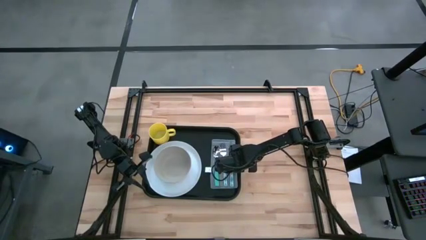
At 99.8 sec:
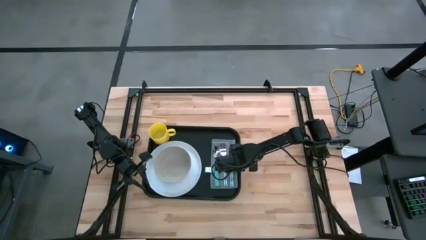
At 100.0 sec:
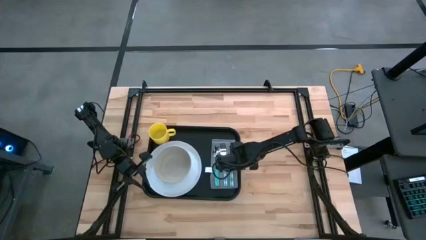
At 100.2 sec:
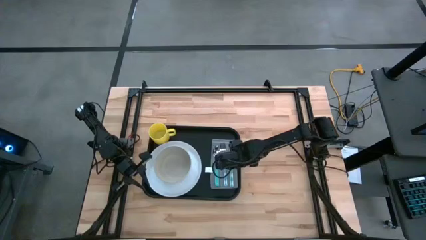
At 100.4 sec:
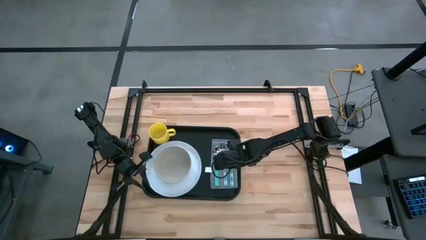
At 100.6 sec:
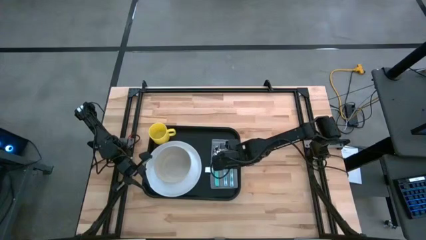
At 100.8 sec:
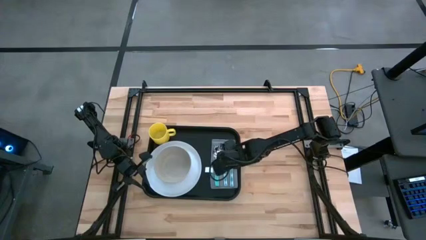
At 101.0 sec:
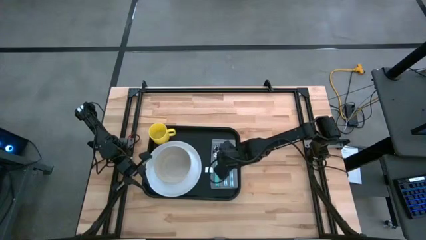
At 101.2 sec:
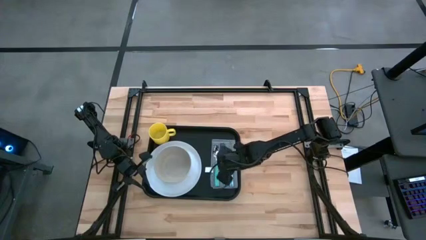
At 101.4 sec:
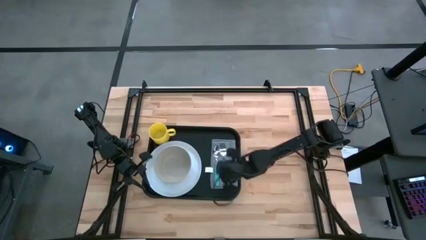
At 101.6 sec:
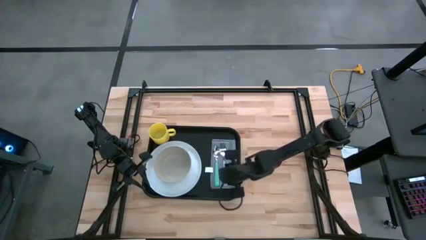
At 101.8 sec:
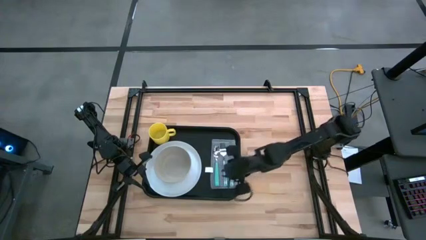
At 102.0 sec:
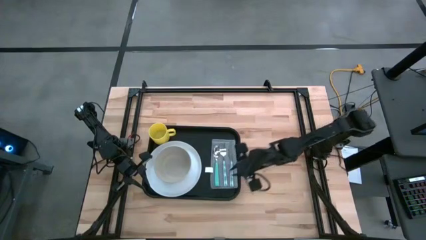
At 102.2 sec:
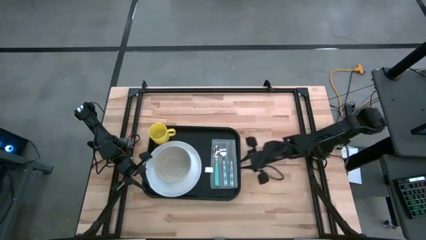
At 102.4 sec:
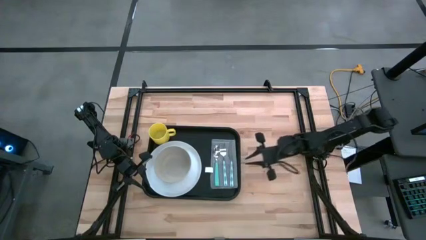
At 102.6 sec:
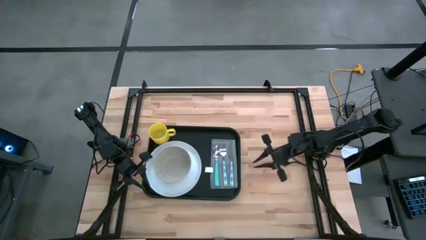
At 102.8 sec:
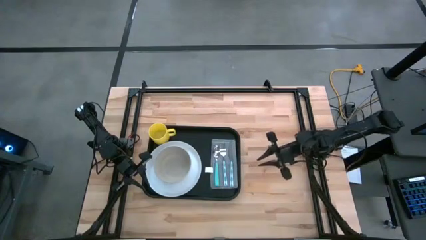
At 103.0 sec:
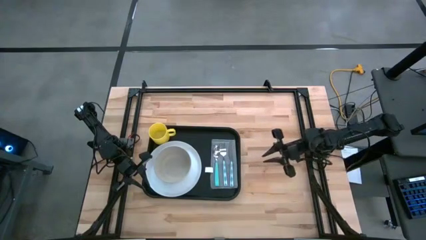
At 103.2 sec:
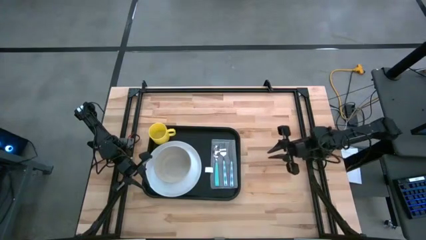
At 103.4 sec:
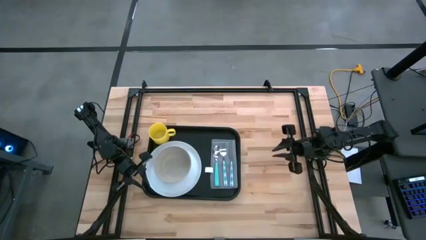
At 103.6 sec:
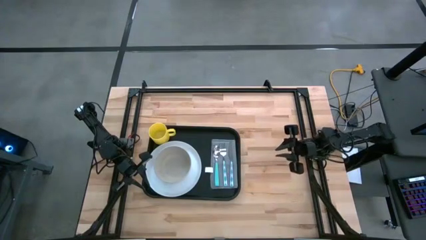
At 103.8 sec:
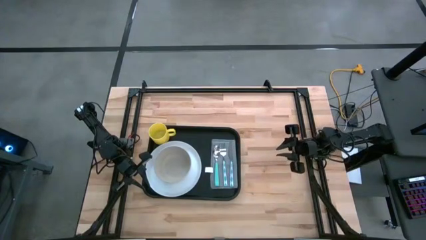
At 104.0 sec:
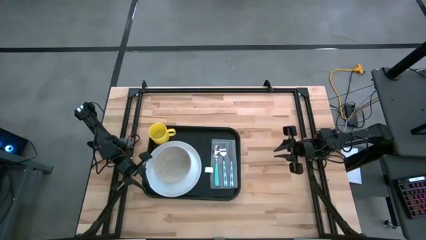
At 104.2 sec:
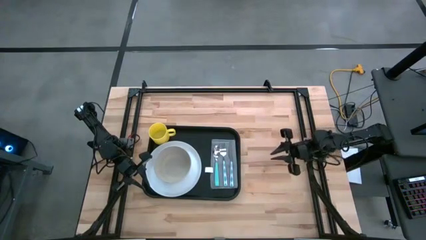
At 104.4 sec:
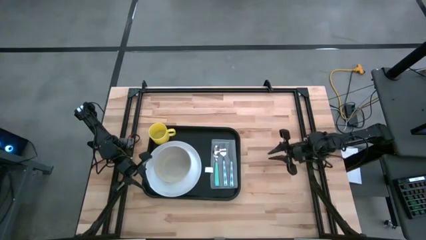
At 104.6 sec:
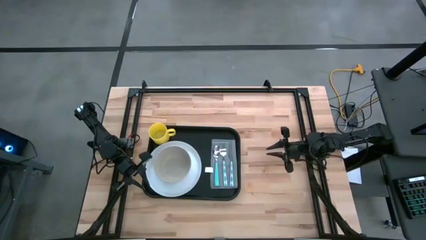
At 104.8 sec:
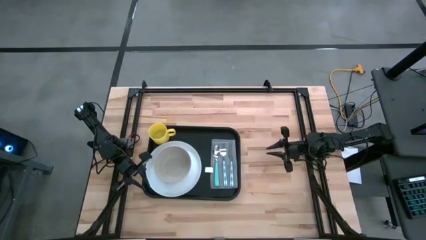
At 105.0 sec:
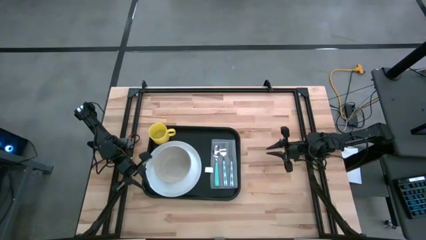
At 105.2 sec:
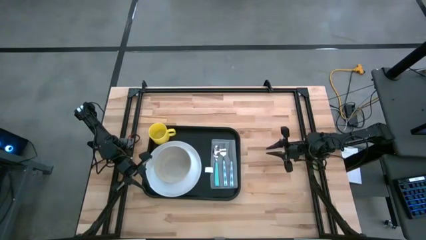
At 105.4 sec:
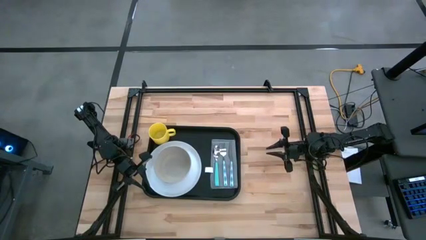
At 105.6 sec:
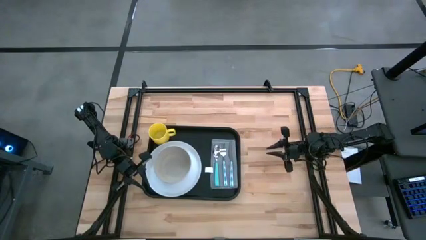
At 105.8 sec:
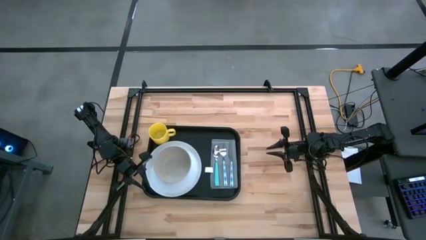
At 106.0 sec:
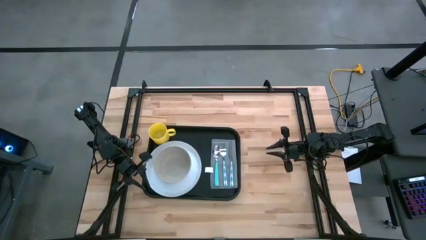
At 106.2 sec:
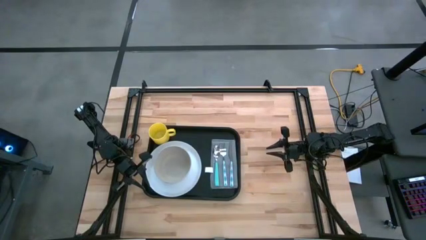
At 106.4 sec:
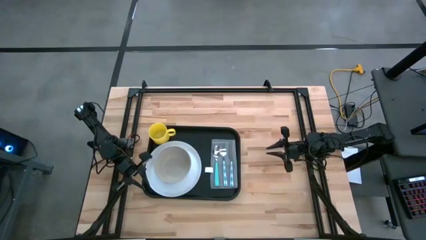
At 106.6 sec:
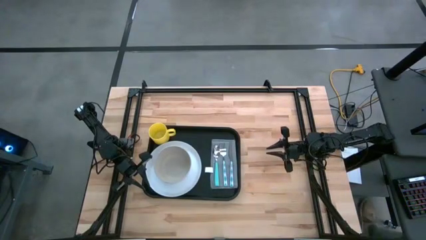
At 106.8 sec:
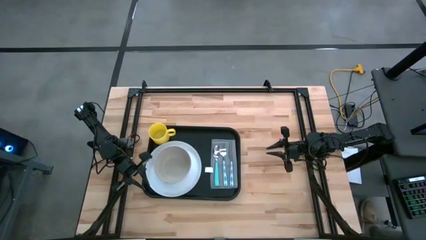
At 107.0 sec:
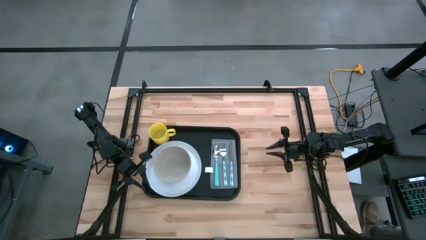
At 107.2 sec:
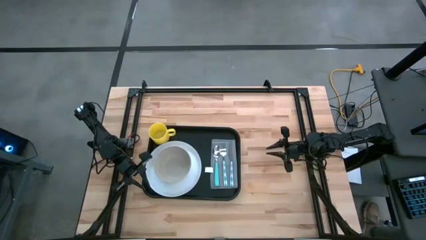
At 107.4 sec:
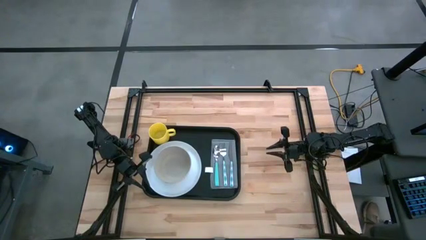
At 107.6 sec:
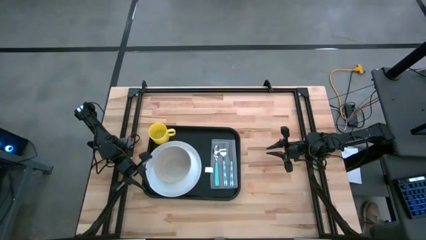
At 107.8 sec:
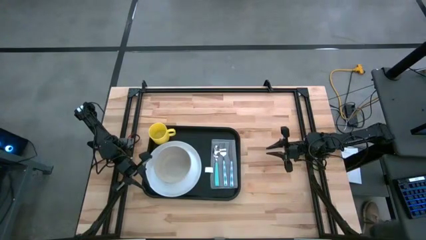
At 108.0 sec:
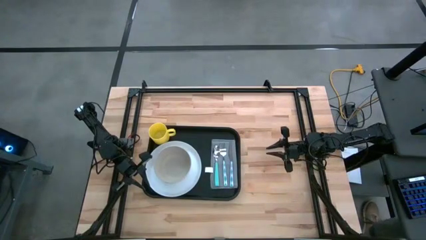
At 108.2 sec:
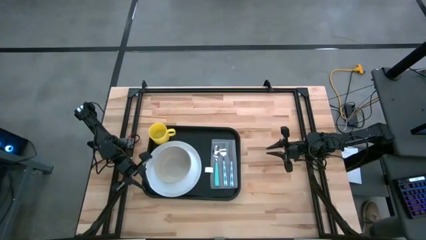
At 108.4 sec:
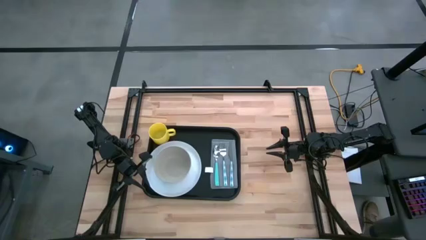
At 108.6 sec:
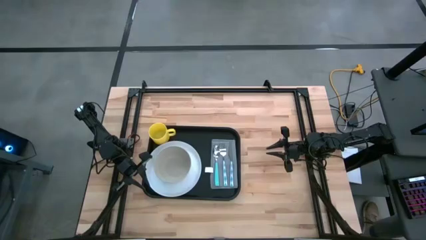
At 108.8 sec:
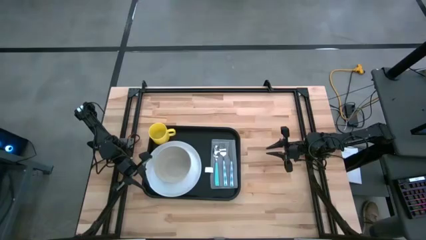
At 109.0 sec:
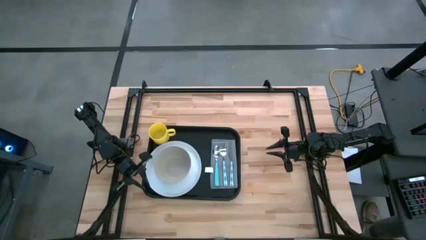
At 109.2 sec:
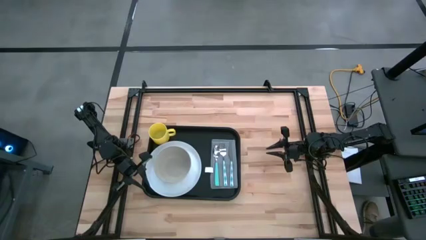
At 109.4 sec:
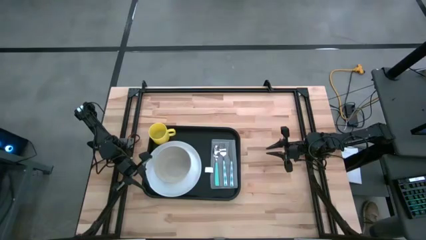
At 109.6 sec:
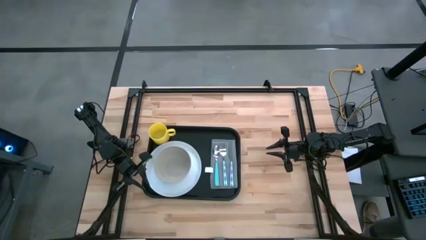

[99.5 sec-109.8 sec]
Task: Set up tray
Return to Home Position

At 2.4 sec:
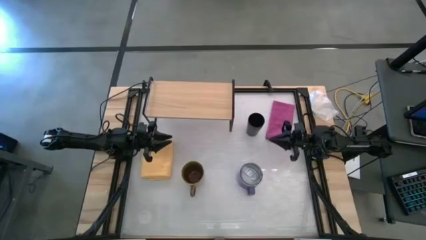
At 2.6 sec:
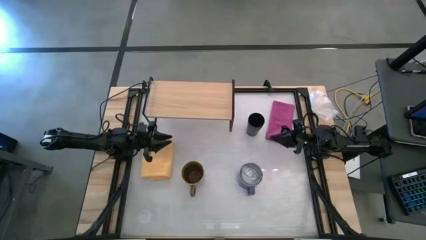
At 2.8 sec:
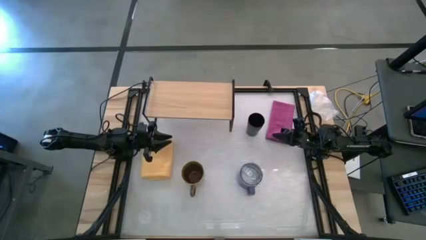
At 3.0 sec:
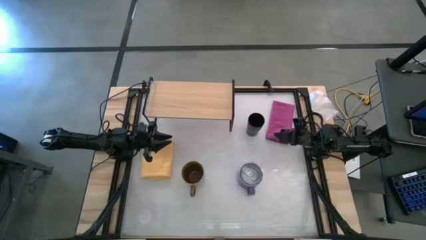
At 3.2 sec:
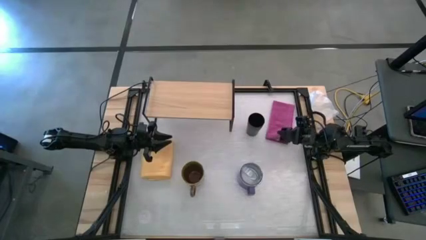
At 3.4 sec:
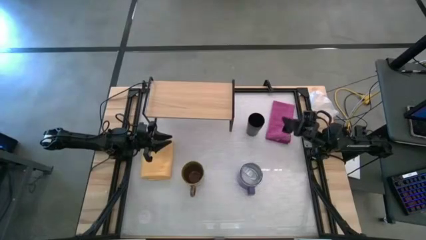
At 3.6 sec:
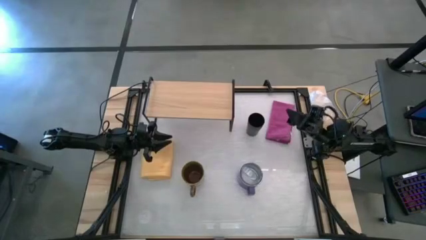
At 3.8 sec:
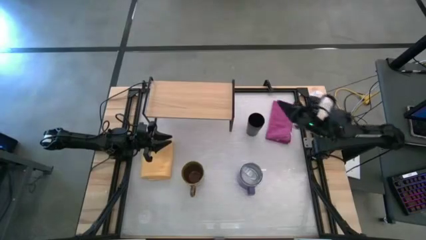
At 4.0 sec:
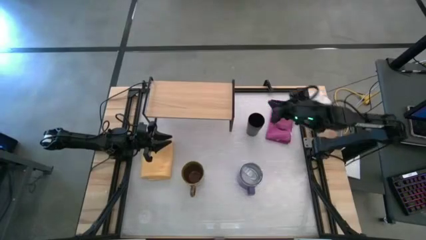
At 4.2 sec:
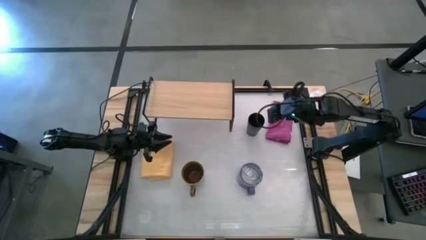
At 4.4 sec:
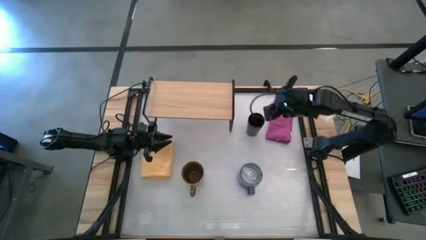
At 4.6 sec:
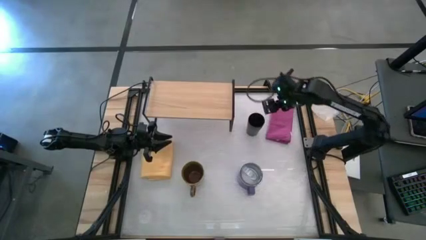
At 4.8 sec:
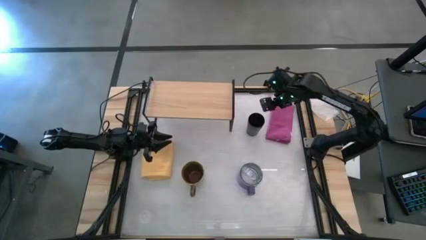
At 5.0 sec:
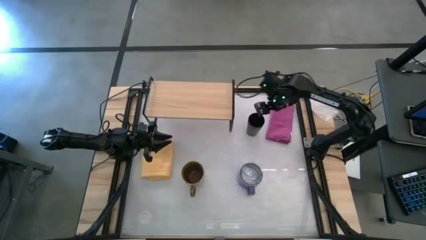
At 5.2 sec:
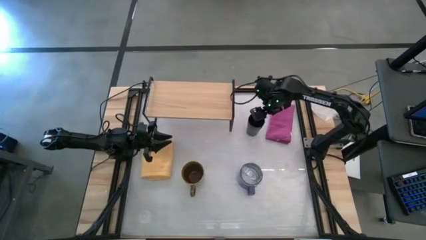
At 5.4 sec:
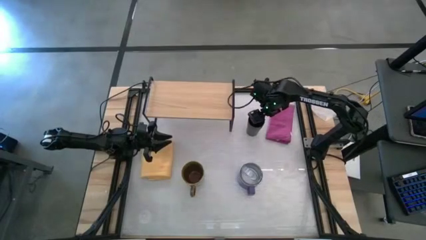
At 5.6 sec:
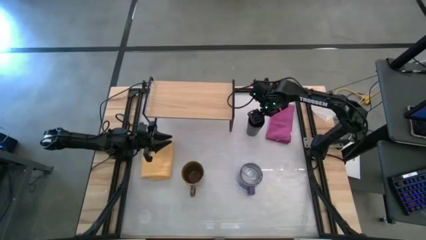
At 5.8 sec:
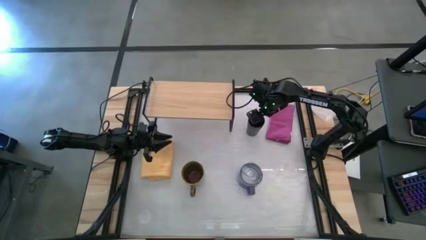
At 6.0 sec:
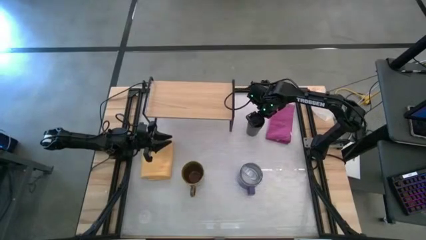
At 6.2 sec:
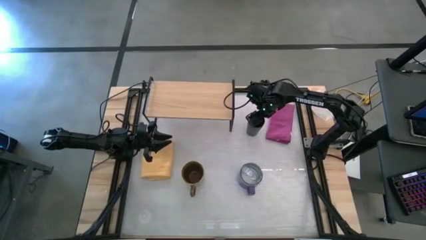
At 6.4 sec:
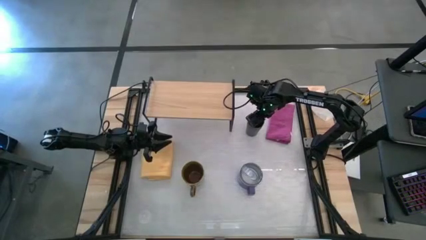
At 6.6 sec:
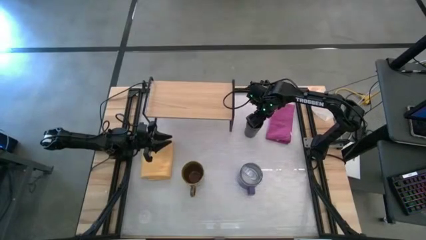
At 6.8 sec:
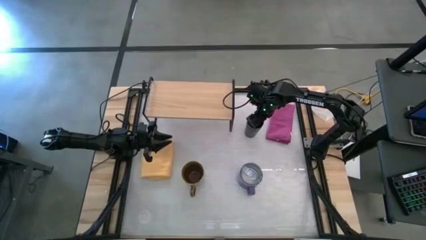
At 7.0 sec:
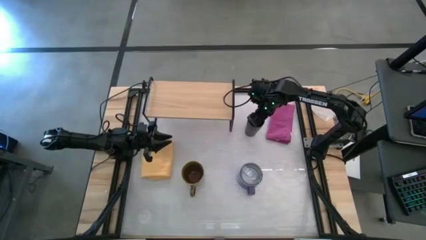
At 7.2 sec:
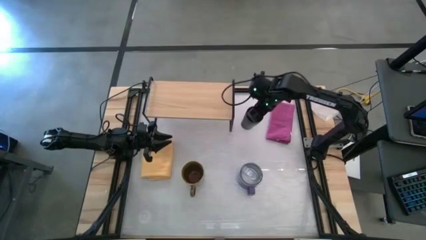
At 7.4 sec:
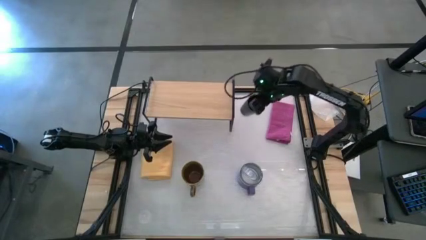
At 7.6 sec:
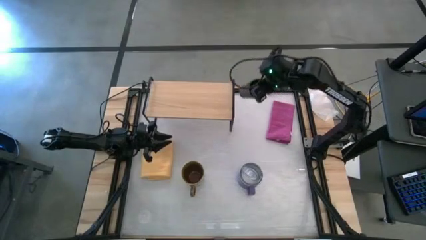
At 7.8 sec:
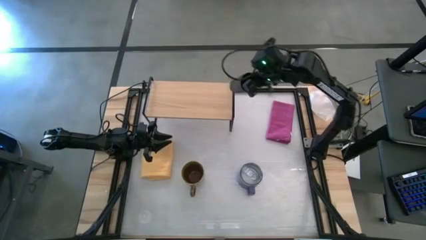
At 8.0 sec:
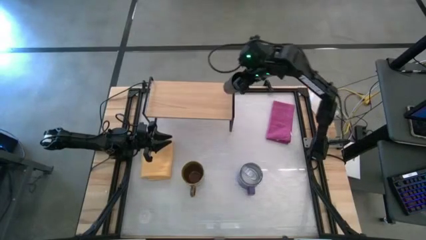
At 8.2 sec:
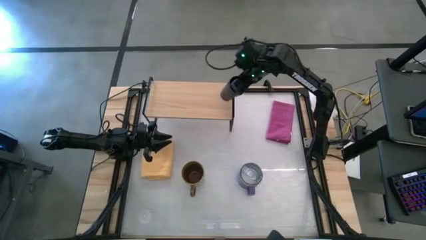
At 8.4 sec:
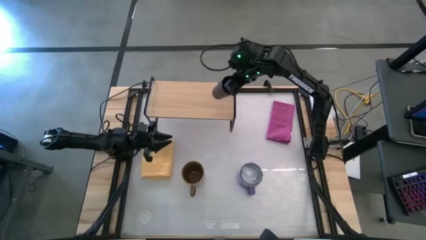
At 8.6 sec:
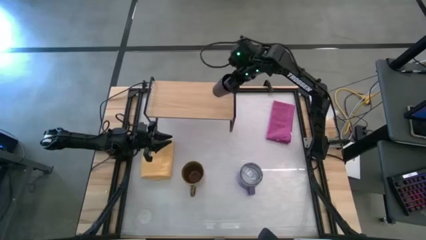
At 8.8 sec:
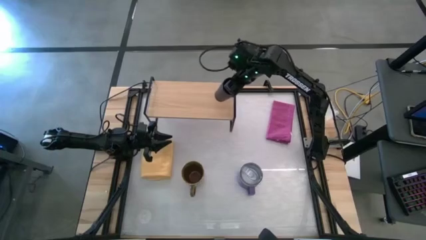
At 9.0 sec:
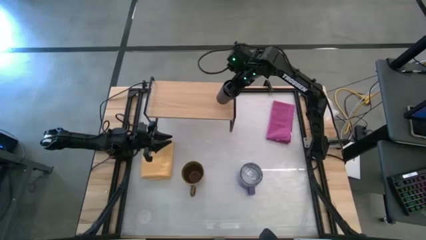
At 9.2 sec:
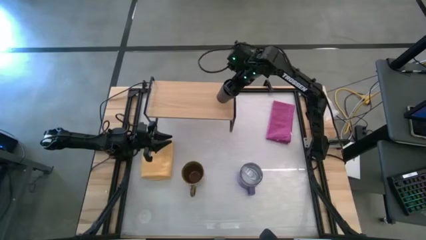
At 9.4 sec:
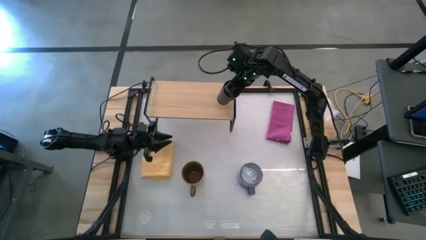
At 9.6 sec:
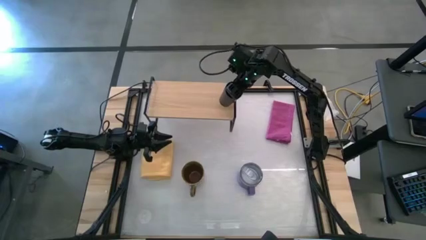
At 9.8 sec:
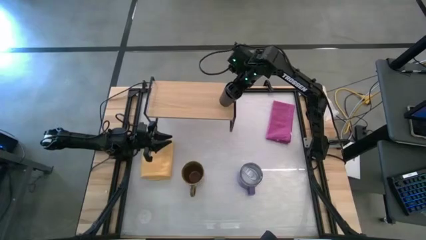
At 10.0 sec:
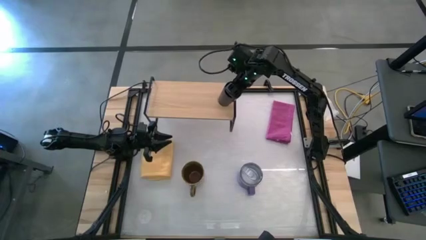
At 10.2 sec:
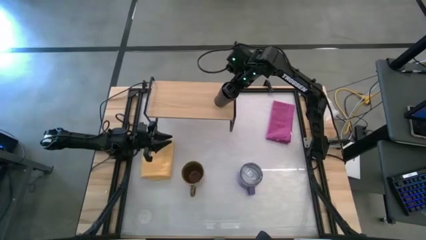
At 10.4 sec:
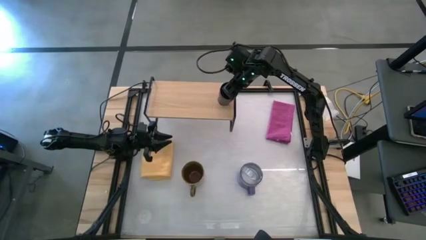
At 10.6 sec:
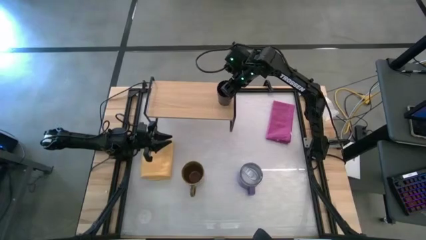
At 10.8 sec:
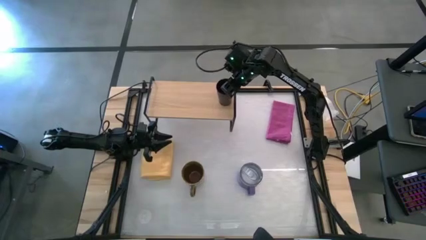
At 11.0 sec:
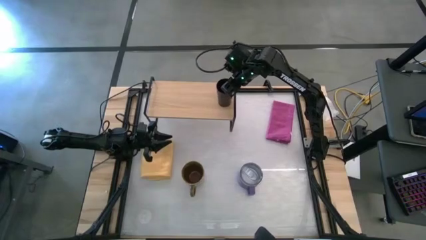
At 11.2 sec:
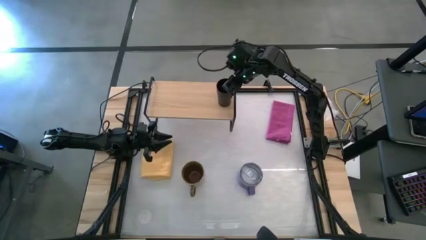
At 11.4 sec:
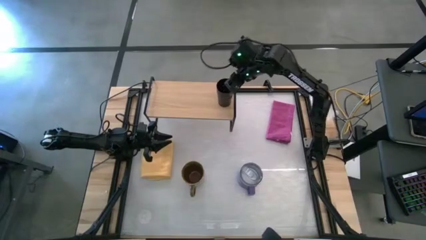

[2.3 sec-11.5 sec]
Task: Stack small to large cups/mugs on shelf
Put the black cup on the shelf
